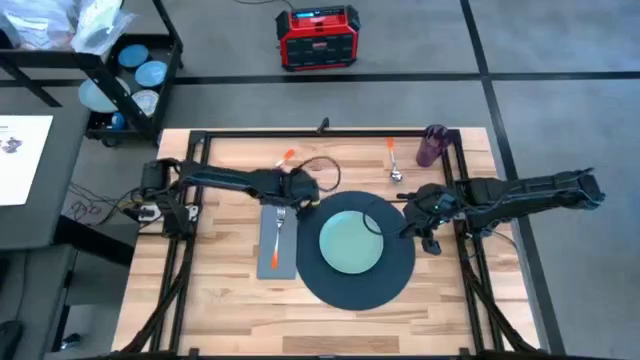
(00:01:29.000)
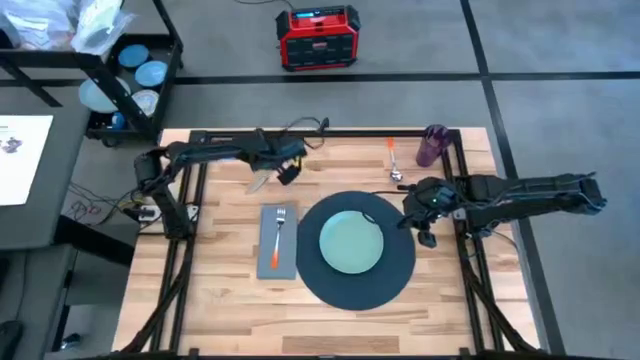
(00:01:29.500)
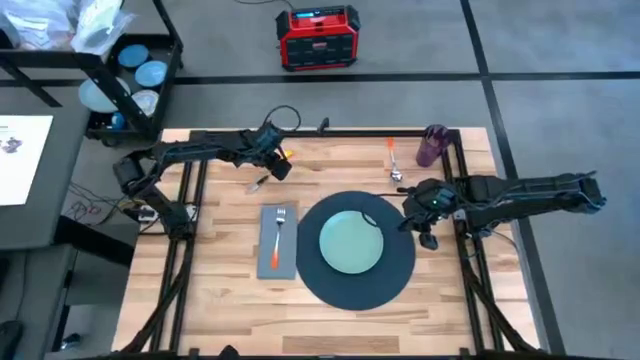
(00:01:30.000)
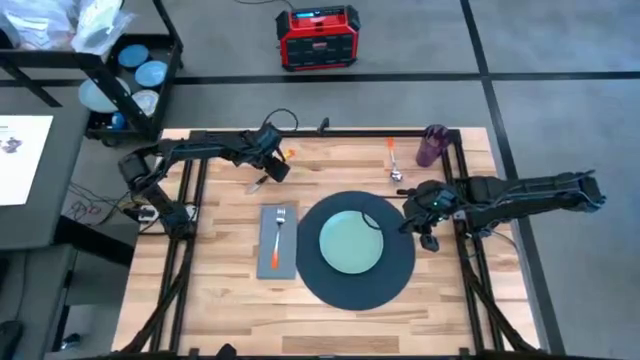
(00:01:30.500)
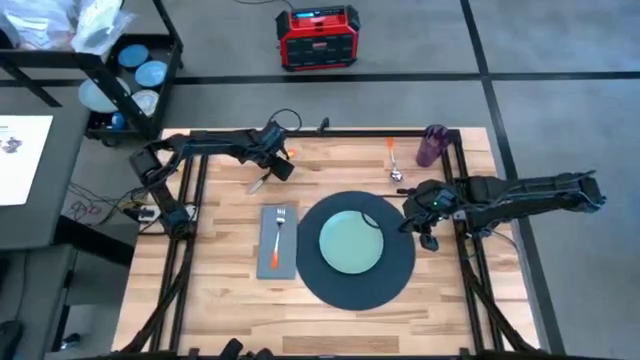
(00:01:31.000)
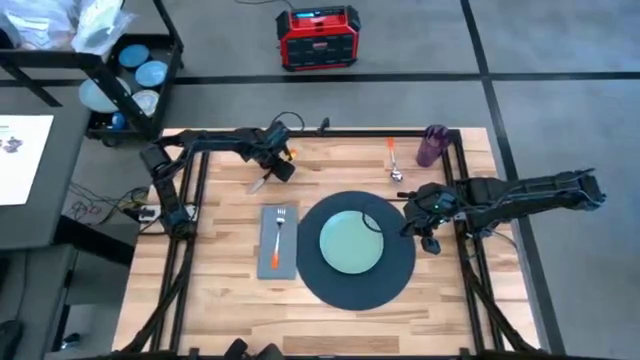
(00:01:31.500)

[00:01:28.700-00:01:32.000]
Task: Set table place
Put the orange knife on the blue placemat

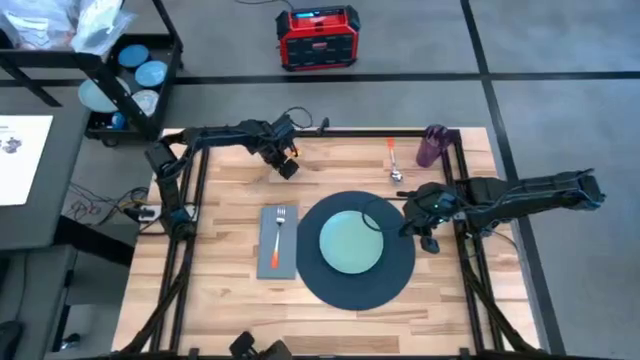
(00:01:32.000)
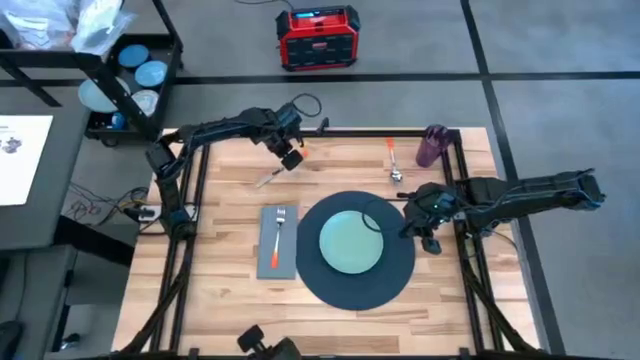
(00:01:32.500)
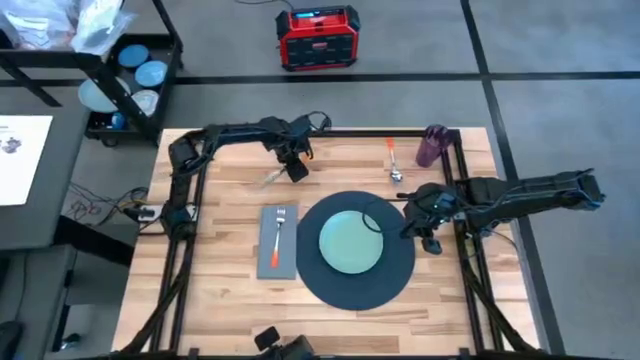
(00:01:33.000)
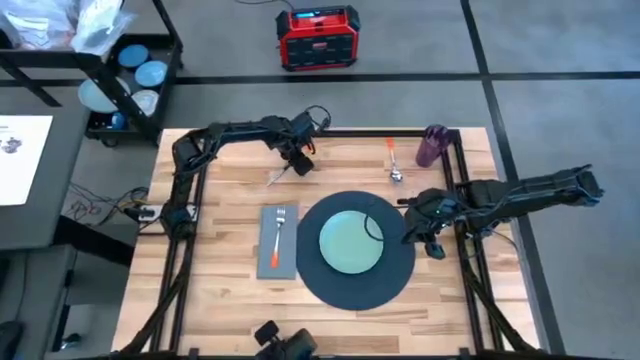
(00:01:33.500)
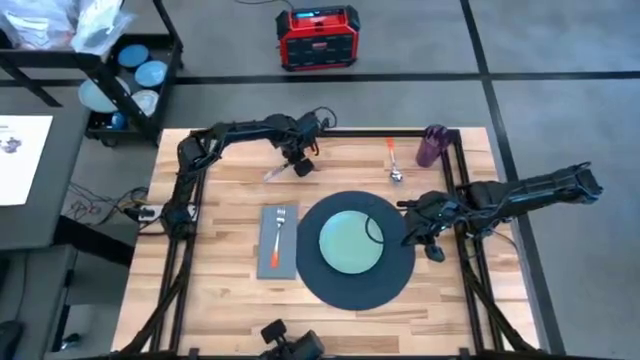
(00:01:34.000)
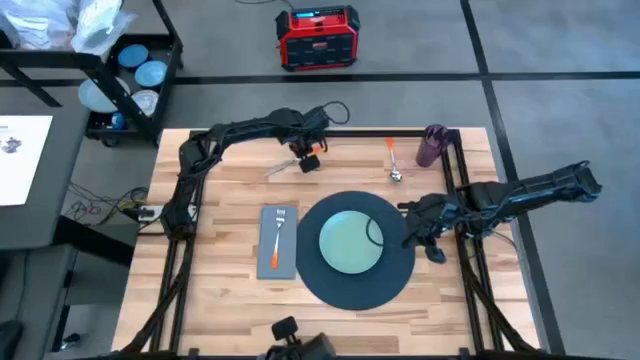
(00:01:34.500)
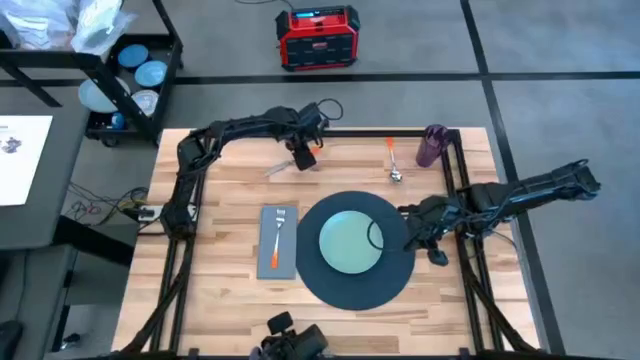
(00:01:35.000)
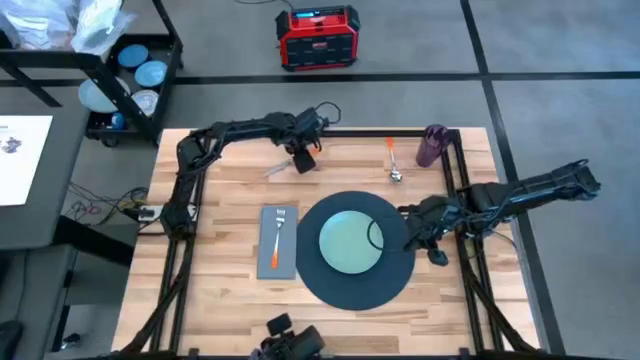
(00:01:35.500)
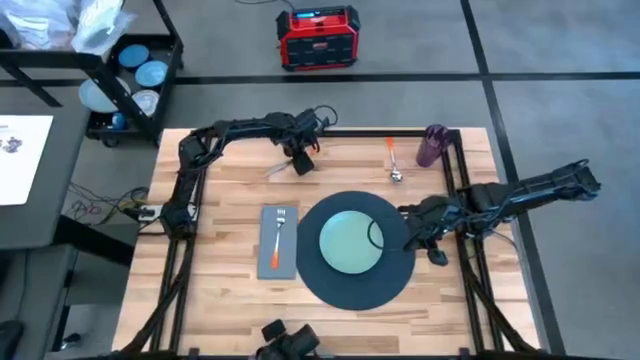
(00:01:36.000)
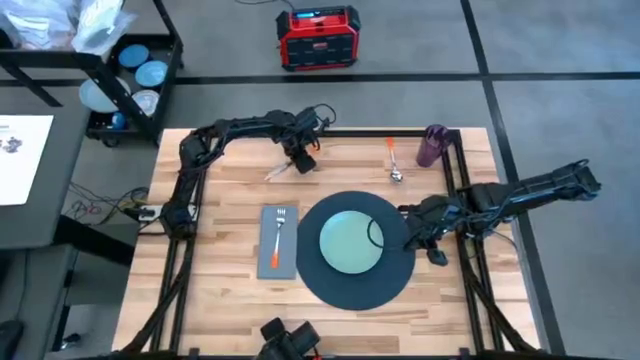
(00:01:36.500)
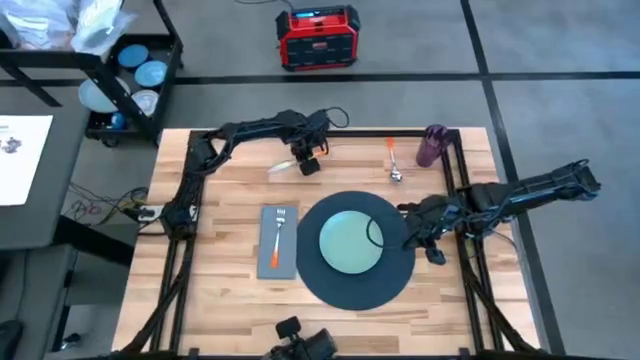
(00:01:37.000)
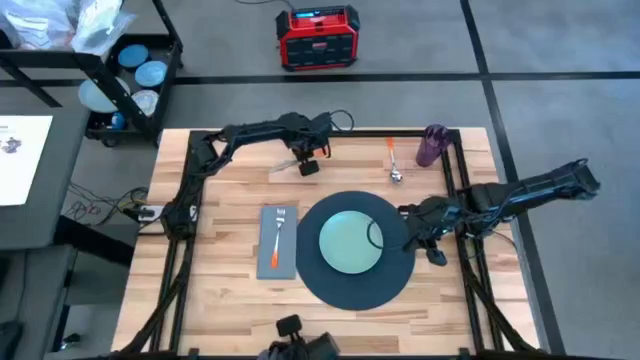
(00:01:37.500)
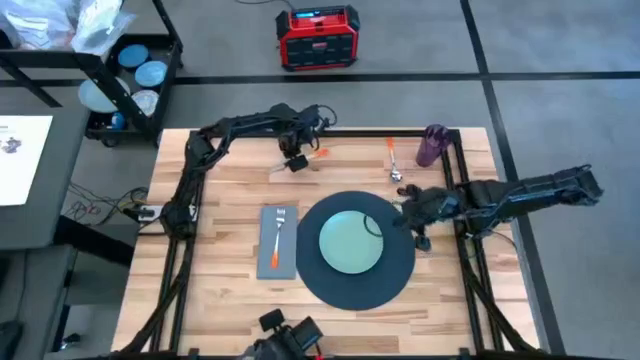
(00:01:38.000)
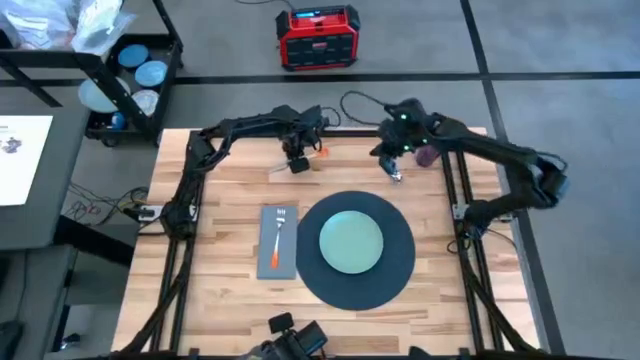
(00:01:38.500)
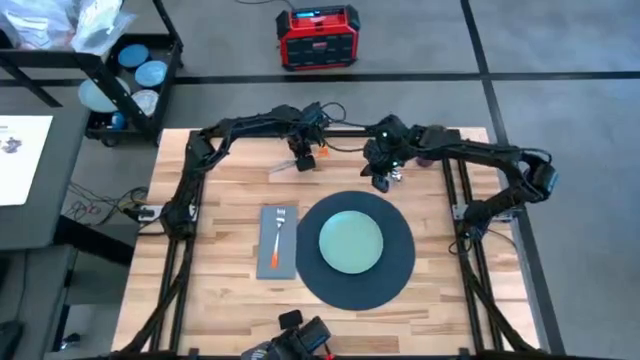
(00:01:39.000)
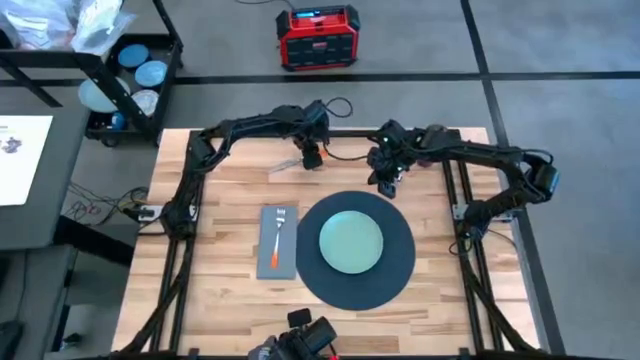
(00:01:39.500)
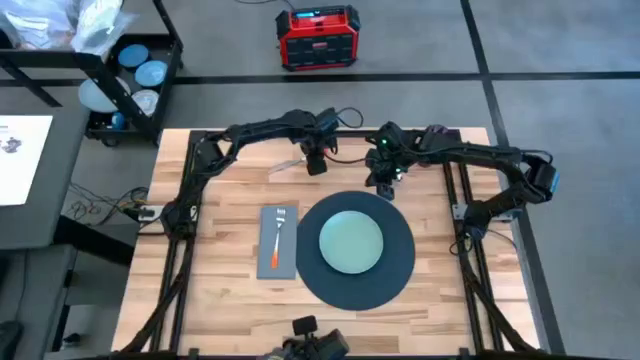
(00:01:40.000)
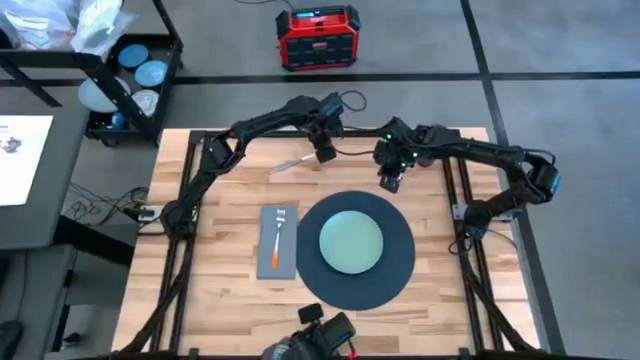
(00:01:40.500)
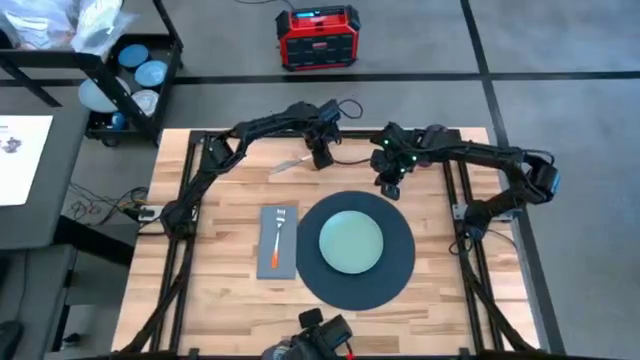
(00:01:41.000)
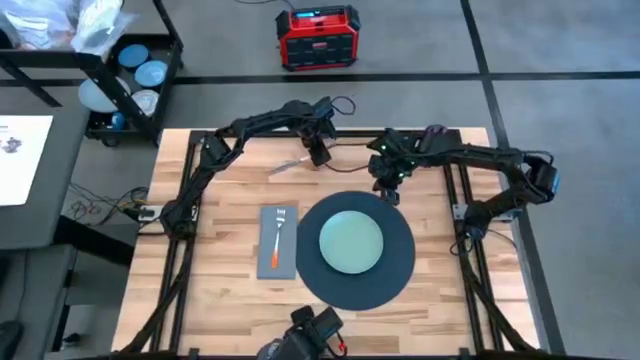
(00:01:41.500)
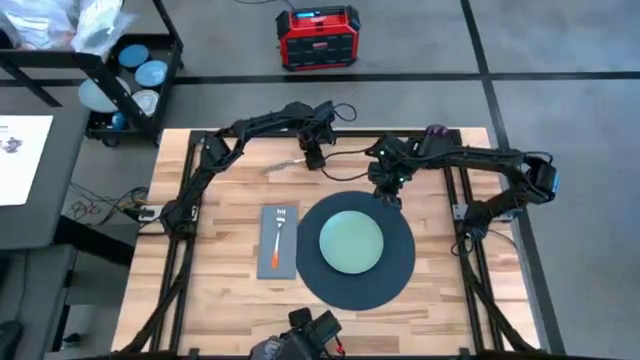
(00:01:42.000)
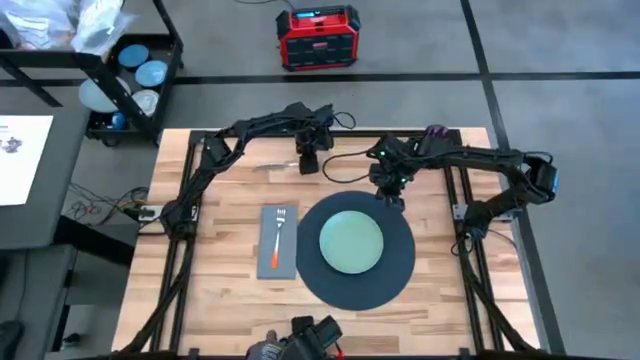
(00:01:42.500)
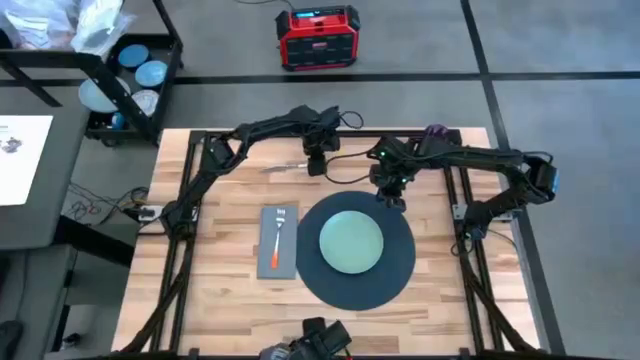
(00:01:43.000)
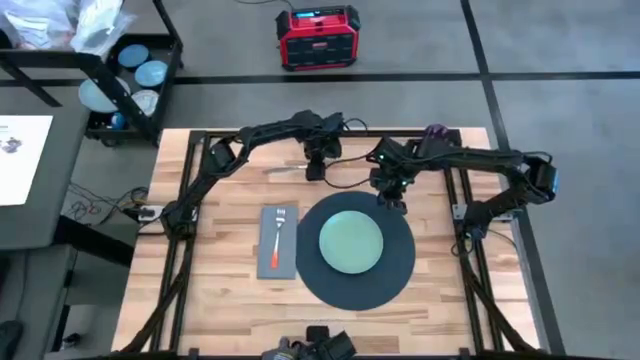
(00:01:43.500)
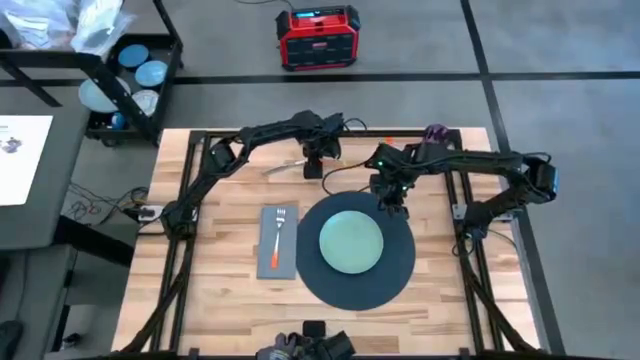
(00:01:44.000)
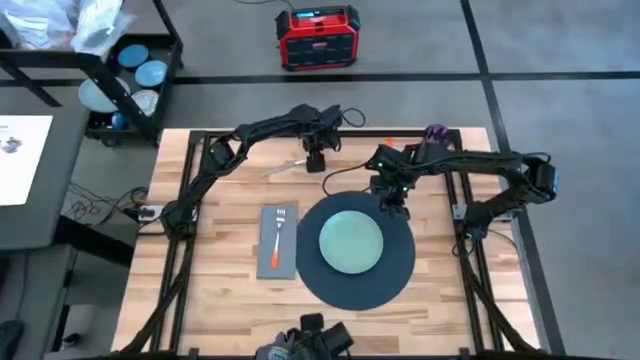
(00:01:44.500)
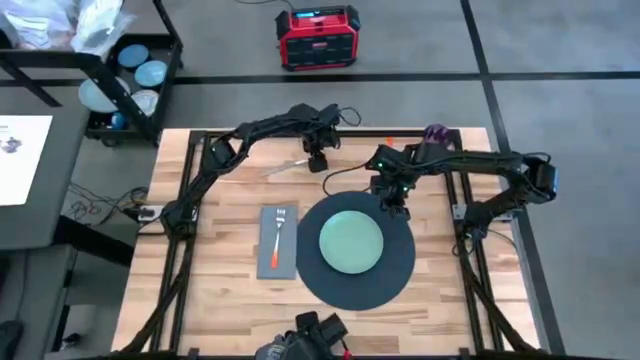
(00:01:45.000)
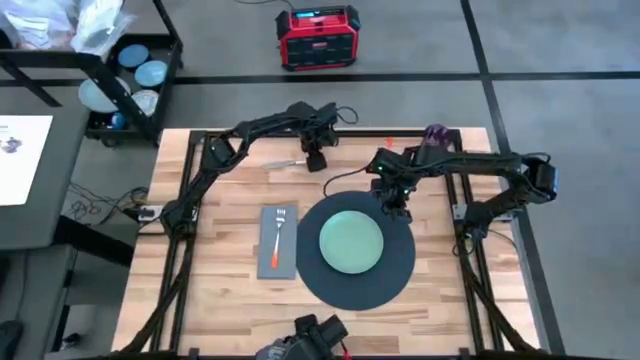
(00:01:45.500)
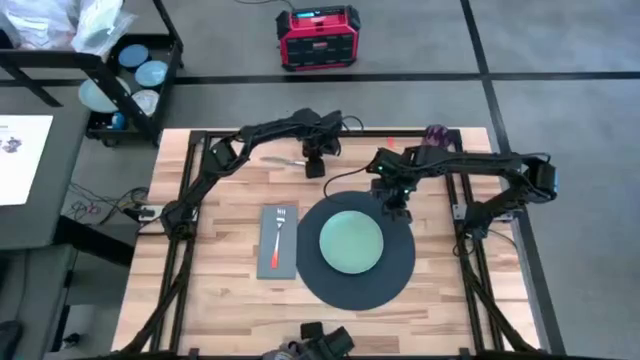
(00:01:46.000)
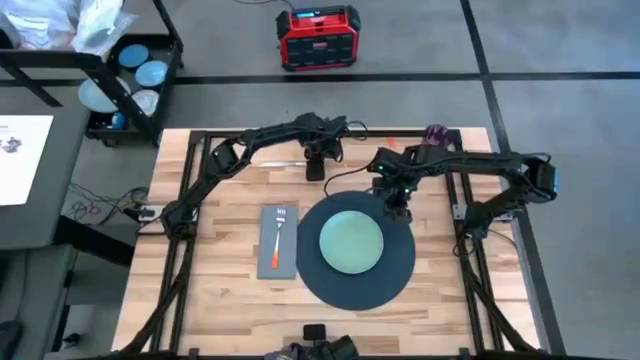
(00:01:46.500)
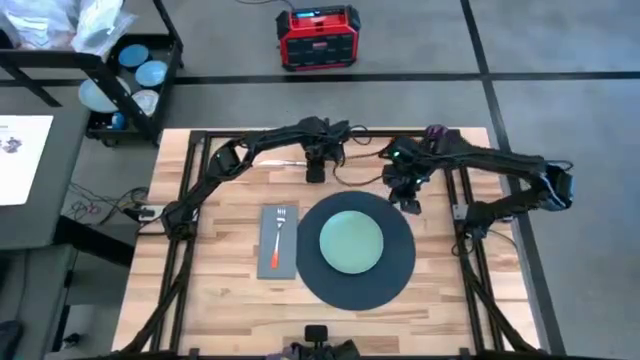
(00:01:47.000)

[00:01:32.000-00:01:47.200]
Put the orange knife on the blue placemat

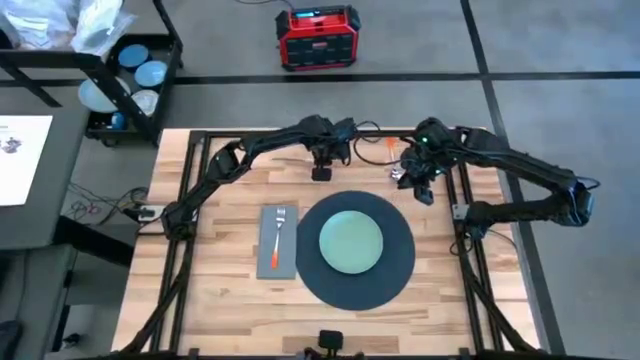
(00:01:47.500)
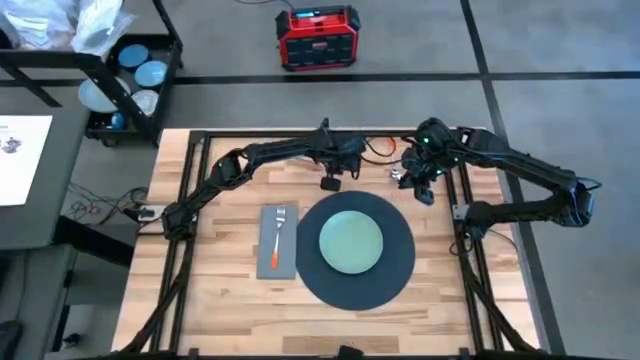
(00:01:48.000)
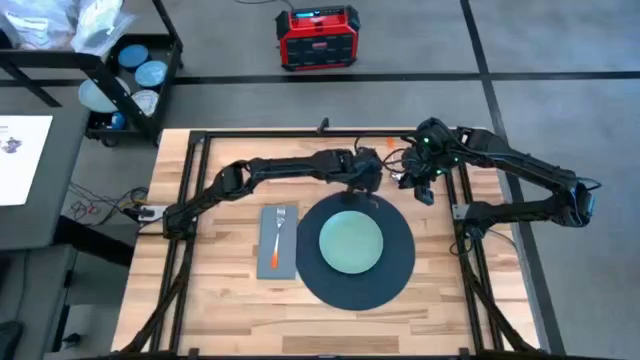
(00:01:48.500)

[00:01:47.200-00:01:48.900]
Put the orange knife on the blue placemat

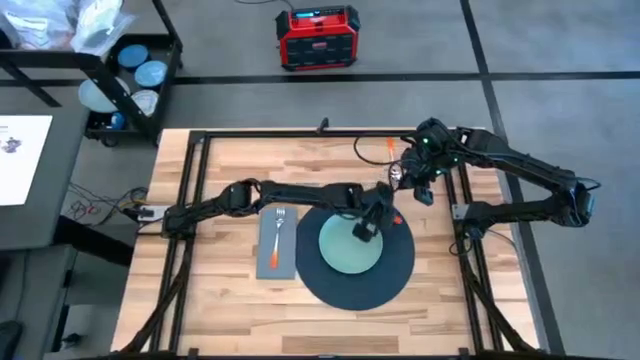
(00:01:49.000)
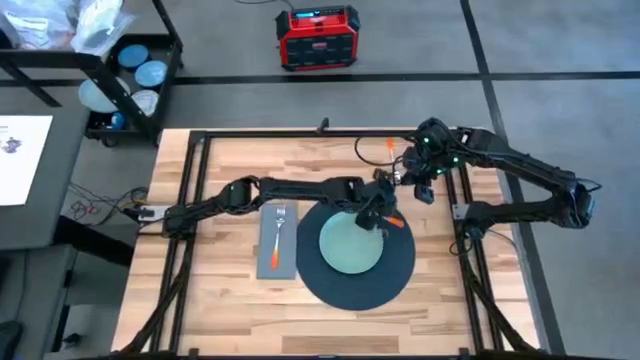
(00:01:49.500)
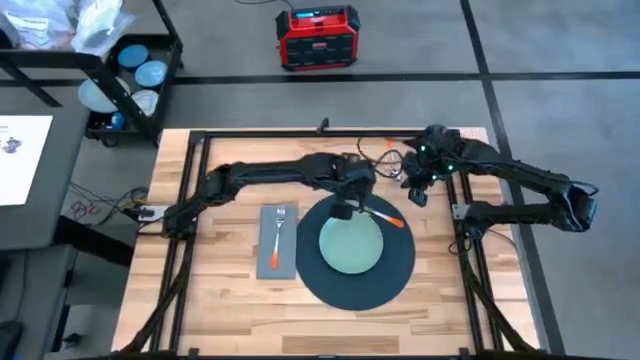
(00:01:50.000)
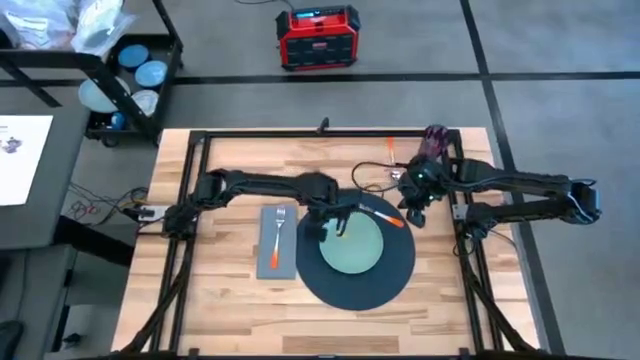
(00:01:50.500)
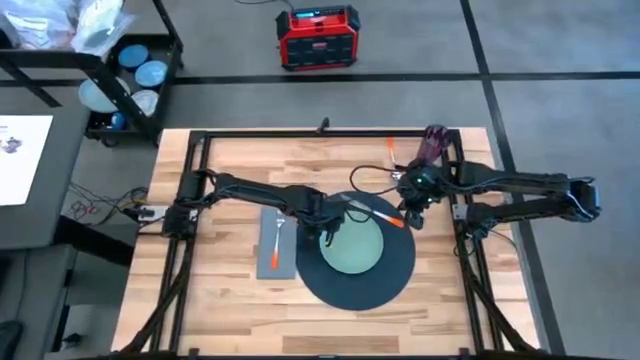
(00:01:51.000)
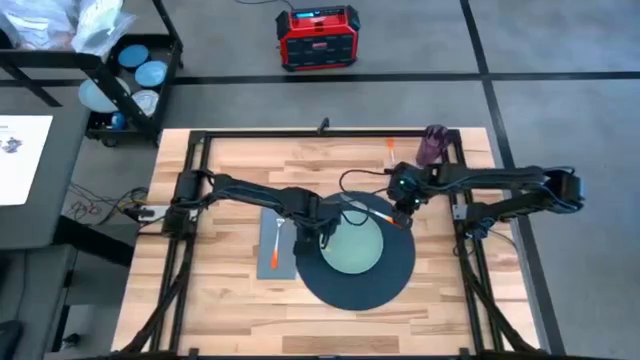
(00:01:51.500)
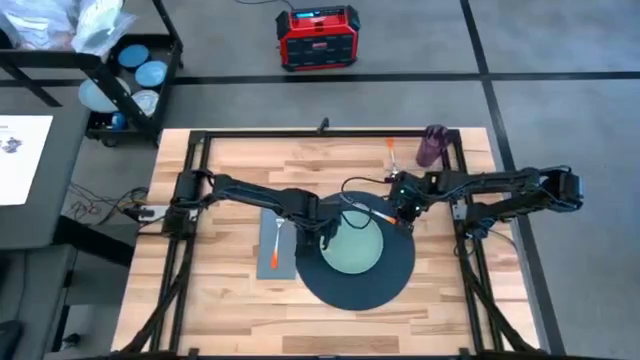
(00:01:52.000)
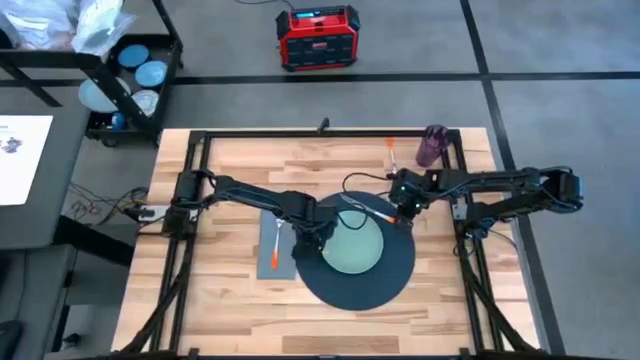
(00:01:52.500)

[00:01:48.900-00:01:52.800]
Put the orange knife on the blue placemat
